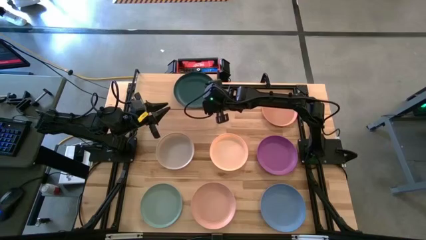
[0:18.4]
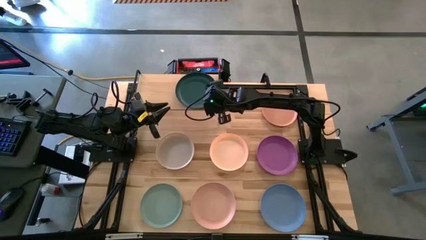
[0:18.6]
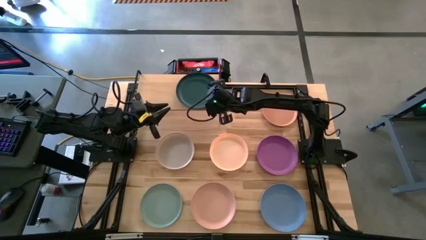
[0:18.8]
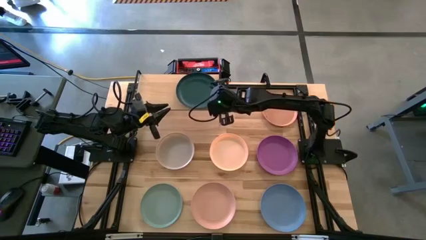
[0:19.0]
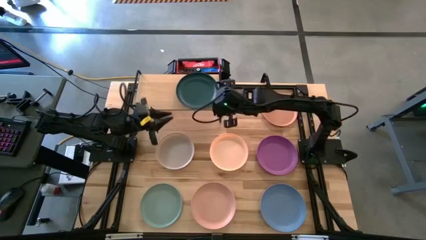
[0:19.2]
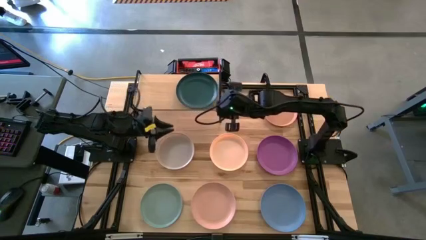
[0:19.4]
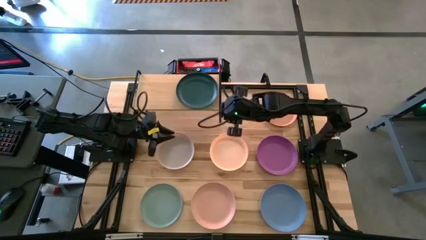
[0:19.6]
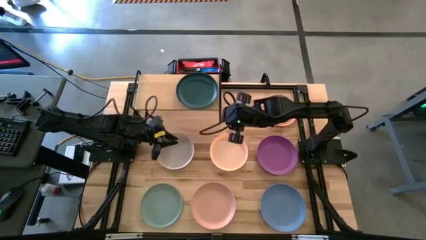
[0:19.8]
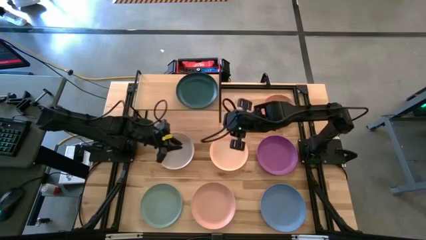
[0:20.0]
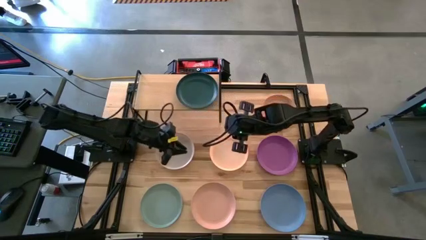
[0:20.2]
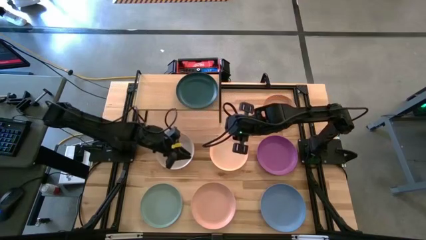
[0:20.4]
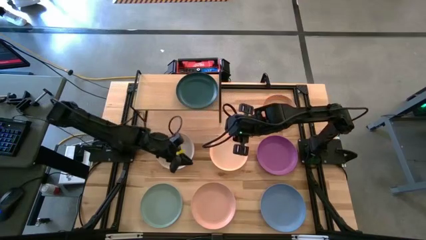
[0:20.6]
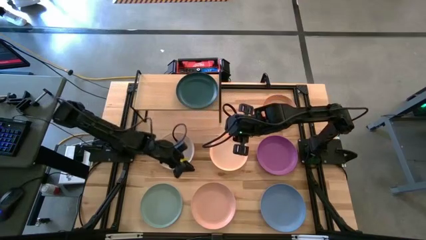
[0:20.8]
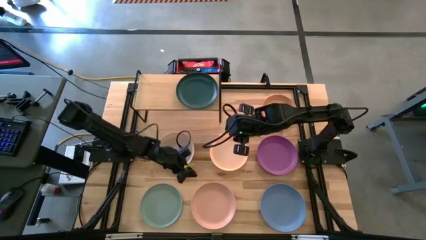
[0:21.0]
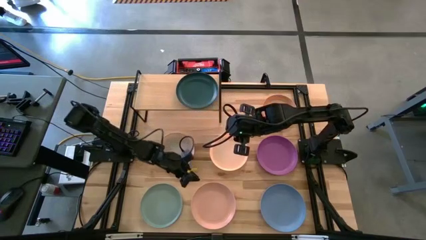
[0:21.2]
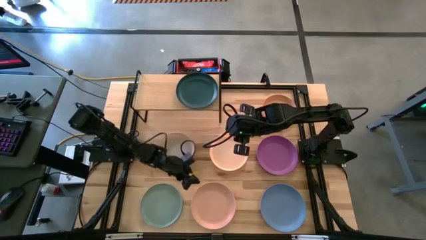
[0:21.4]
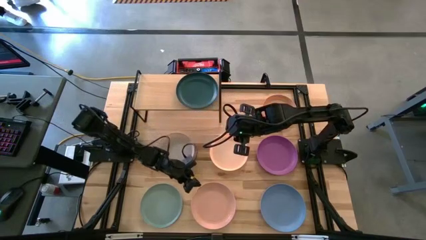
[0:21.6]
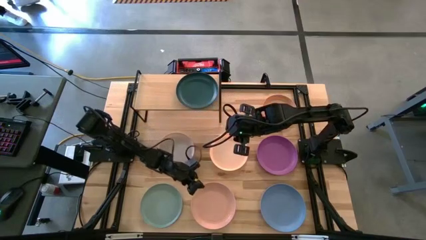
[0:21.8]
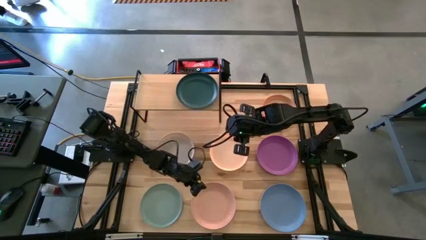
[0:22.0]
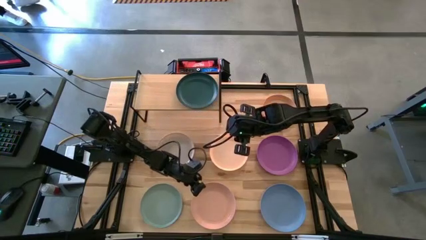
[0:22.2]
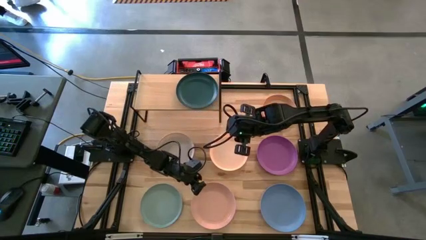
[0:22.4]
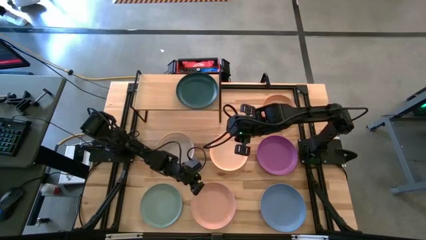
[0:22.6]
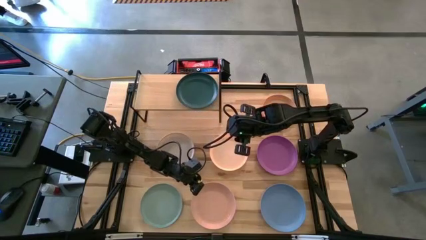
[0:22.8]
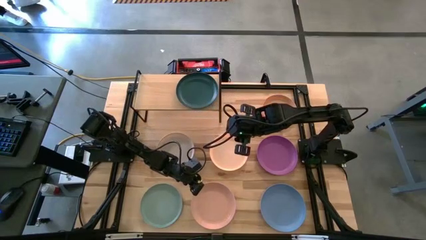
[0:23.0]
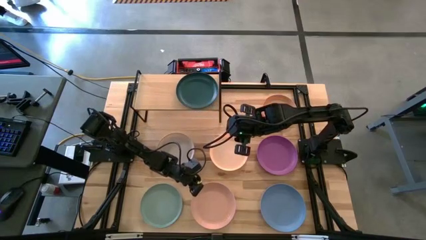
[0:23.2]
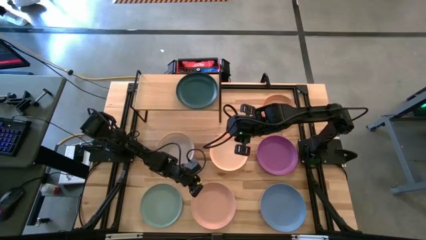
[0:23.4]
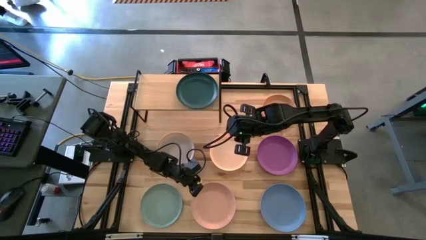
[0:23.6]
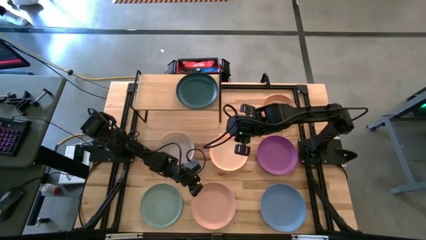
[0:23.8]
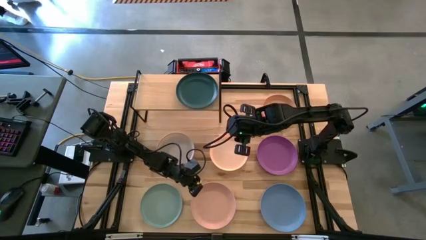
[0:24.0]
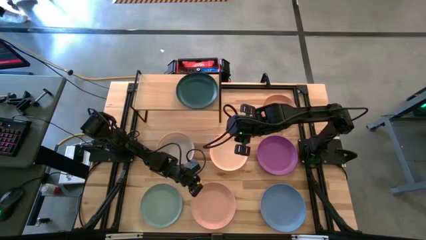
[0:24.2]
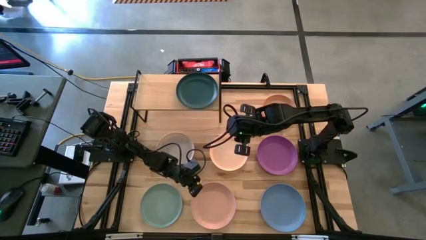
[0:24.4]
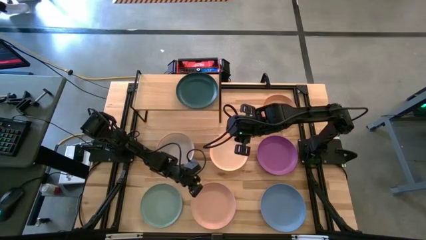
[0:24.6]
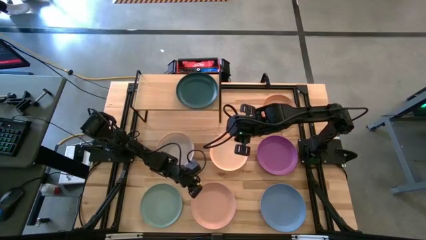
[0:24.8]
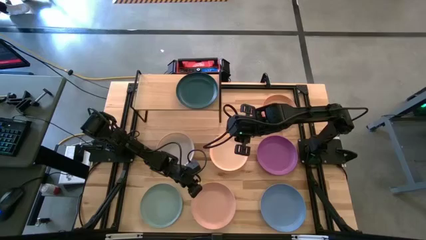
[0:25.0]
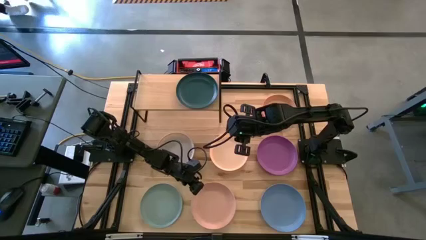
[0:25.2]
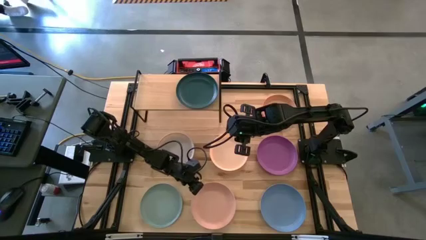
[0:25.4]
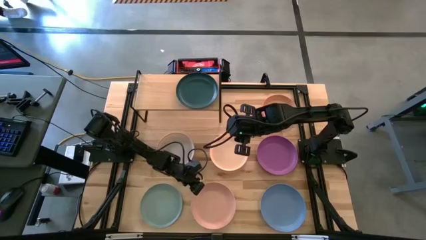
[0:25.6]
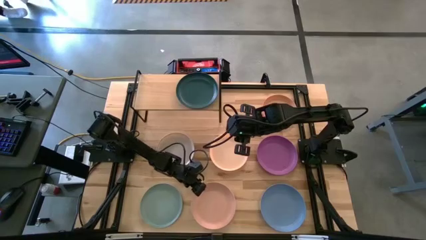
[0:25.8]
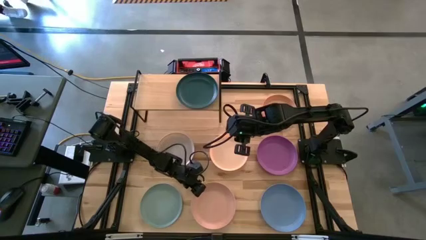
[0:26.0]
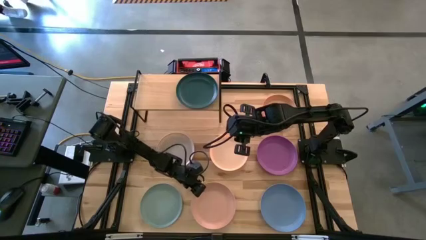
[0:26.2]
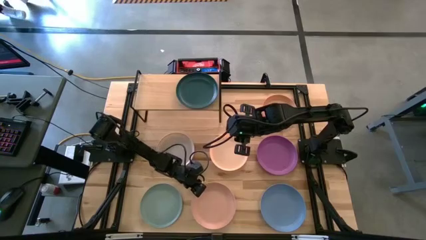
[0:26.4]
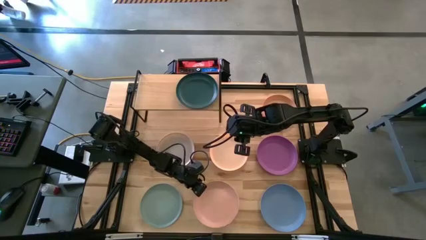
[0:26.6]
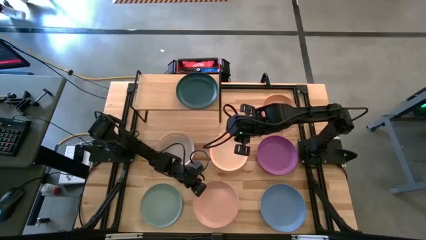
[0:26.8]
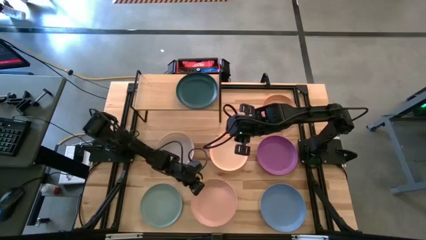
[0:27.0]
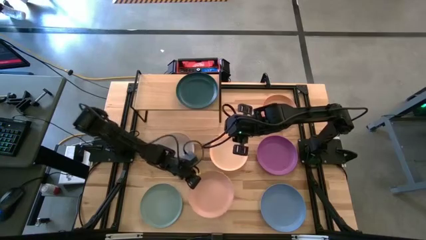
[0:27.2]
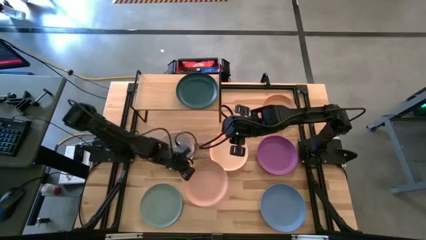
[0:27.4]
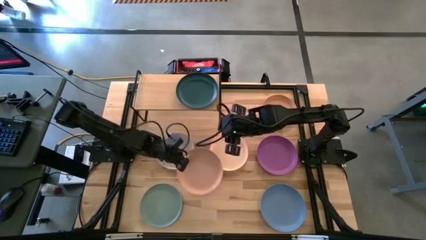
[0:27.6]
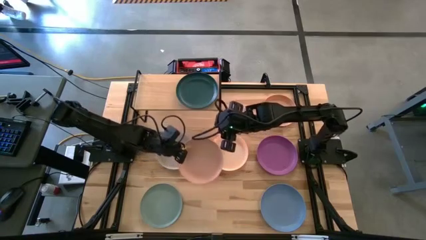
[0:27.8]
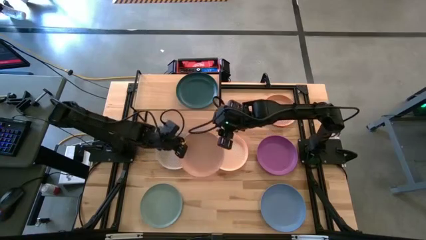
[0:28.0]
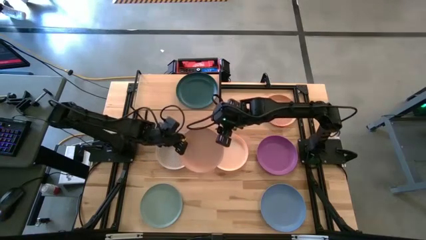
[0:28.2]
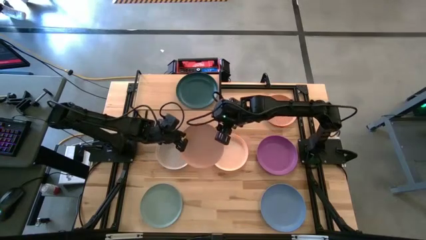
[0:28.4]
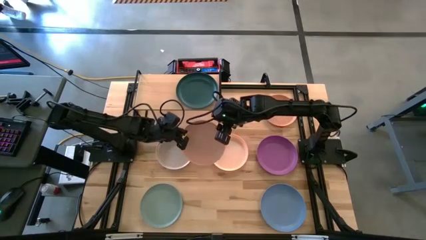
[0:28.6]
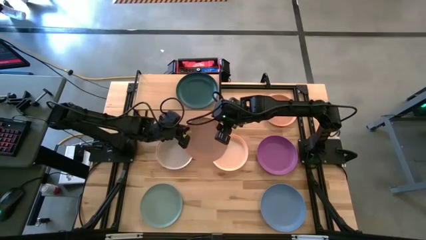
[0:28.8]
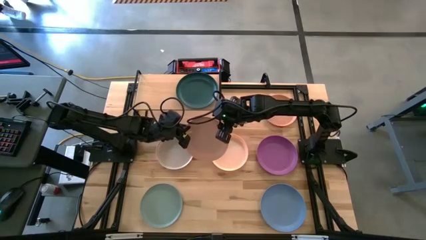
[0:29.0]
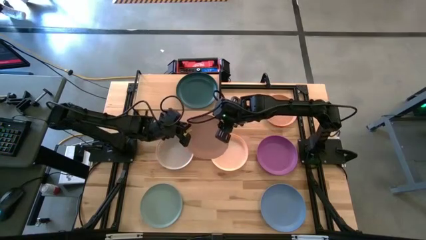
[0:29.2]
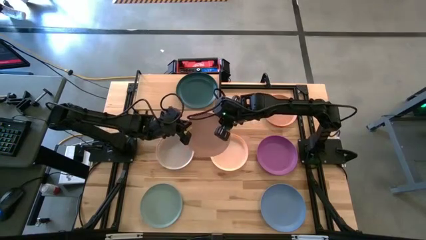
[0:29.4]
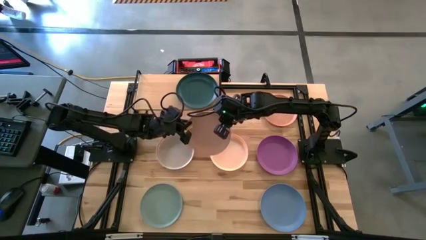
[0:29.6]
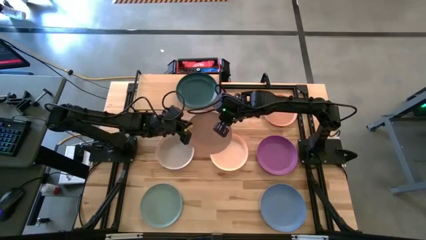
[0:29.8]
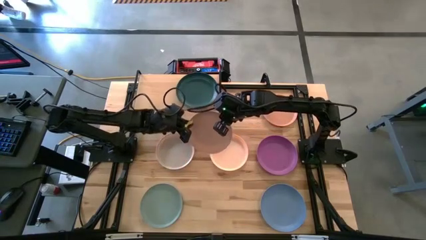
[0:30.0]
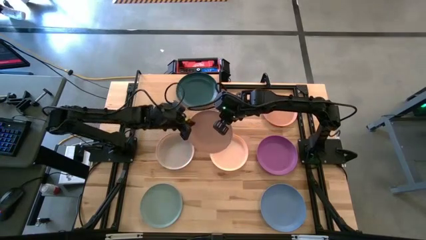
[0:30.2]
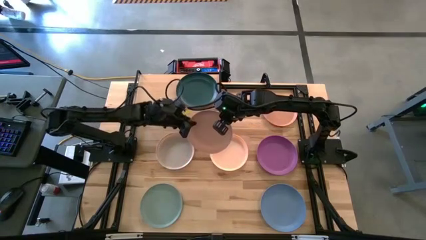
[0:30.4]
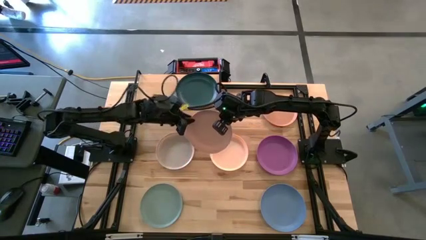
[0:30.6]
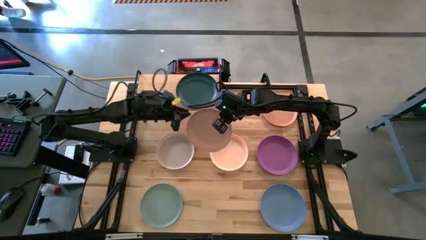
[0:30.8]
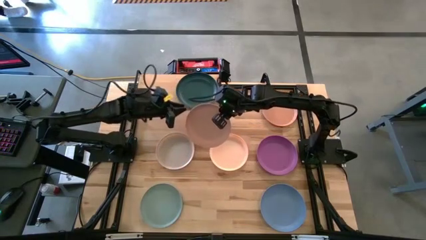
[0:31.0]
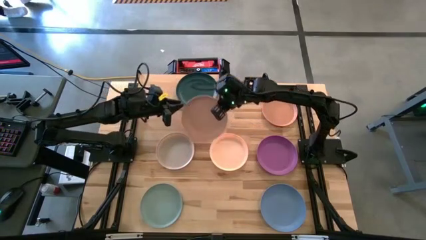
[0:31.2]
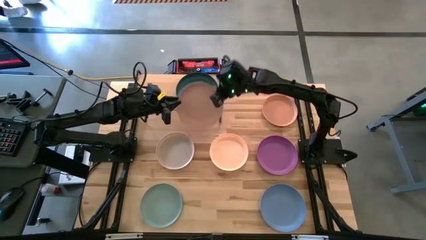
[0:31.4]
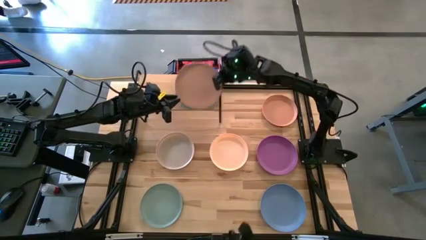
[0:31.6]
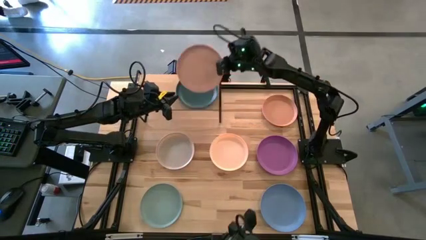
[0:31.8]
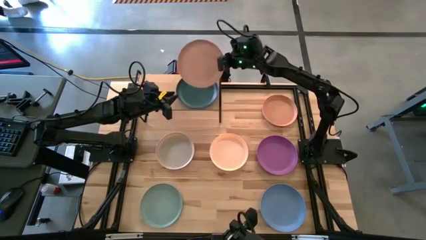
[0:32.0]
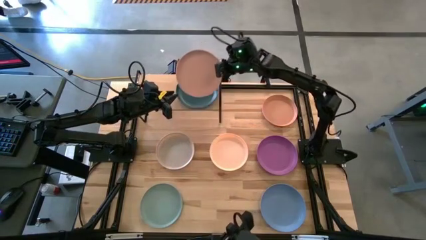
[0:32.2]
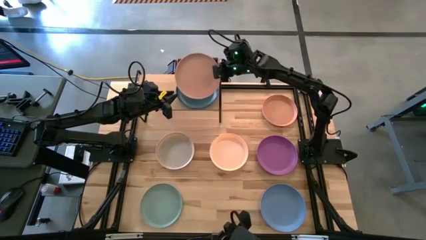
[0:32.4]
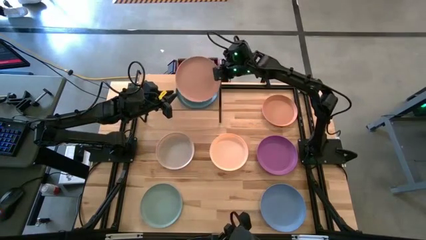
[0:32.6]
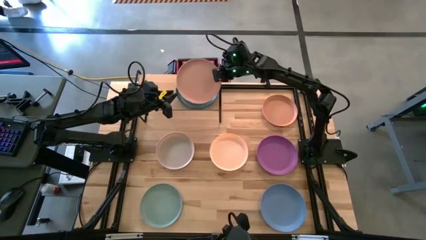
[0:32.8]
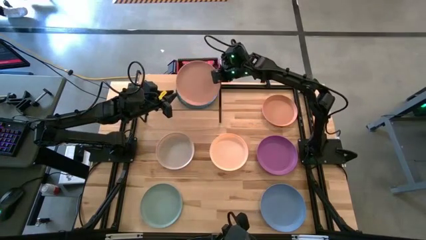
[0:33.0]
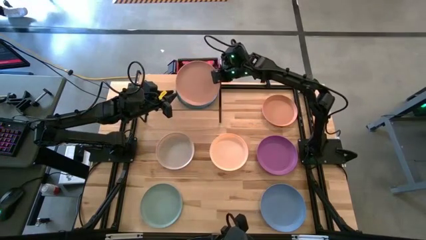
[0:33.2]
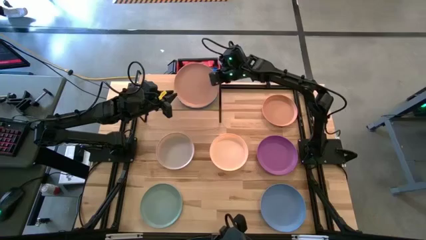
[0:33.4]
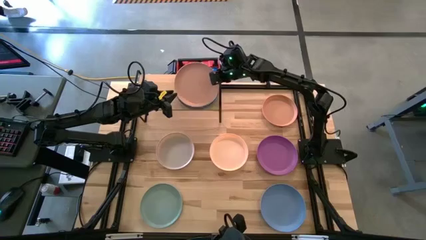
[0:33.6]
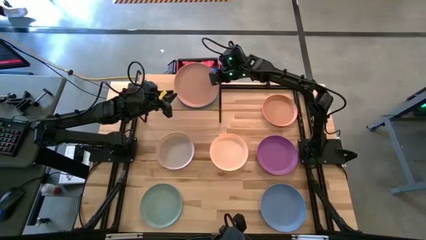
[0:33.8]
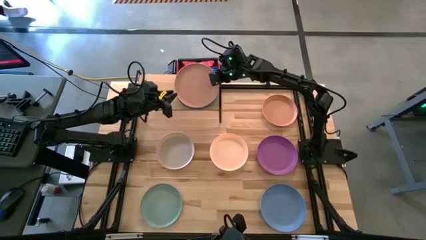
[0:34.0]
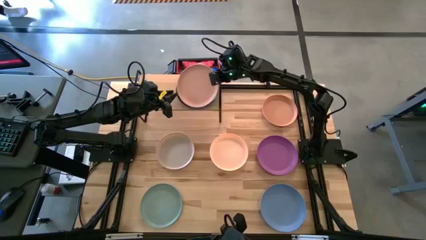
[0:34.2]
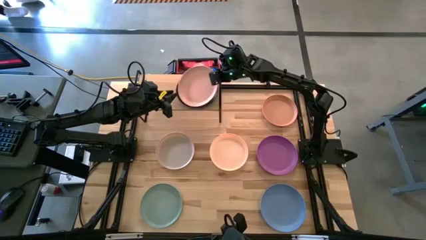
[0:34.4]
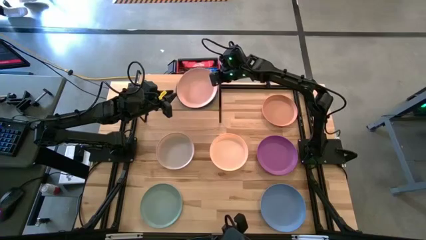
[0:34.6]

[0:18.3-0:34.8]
Task: Place and stack plates onto a shelf
Stack the bottom light brown plate on top the green plate on the shelf
